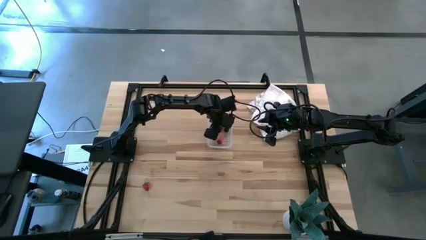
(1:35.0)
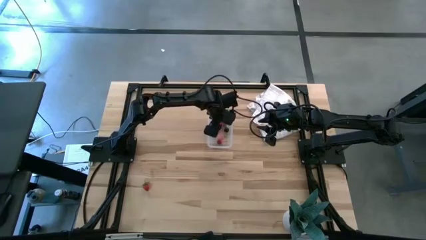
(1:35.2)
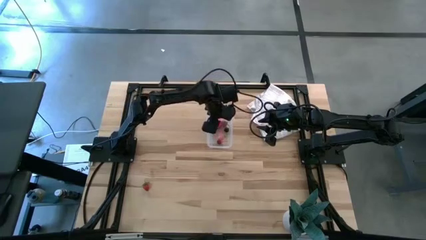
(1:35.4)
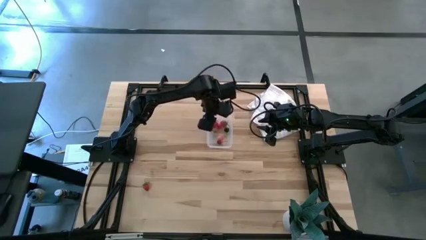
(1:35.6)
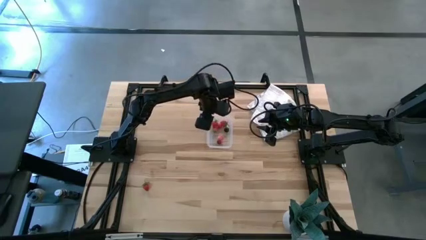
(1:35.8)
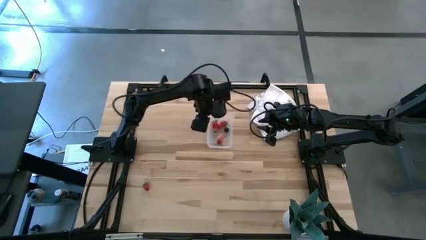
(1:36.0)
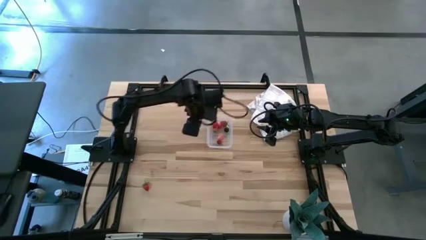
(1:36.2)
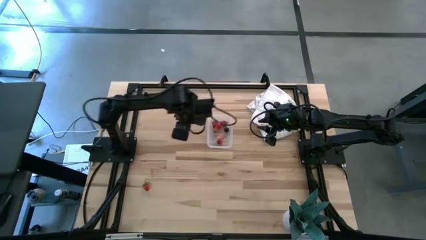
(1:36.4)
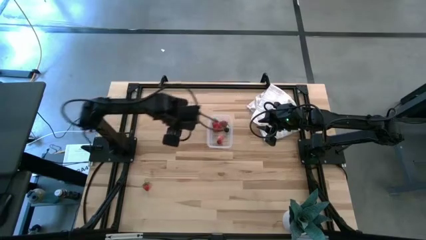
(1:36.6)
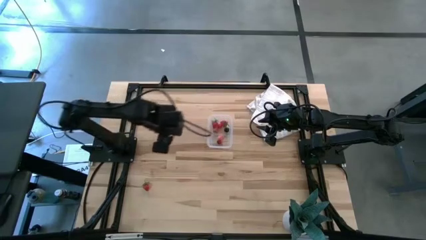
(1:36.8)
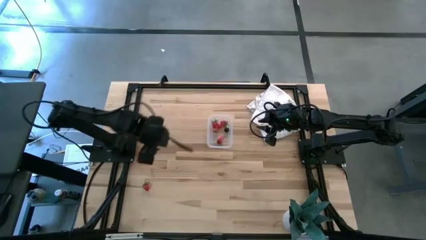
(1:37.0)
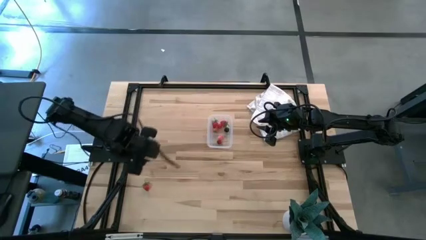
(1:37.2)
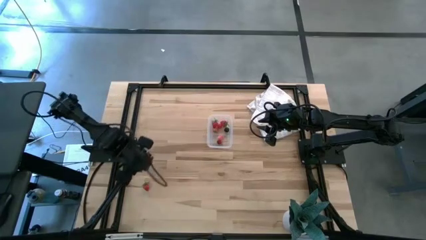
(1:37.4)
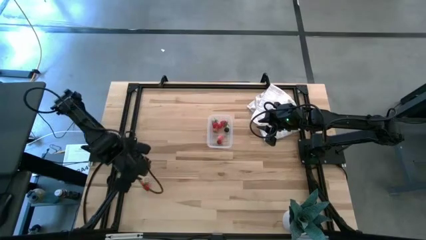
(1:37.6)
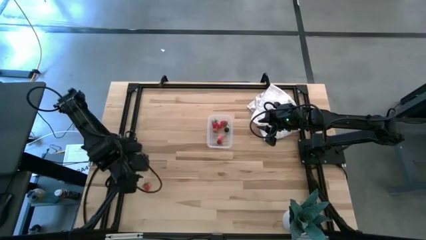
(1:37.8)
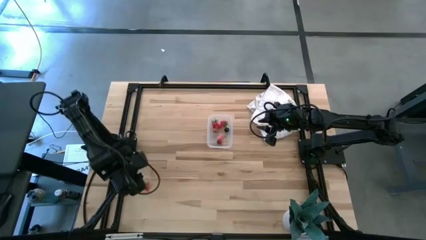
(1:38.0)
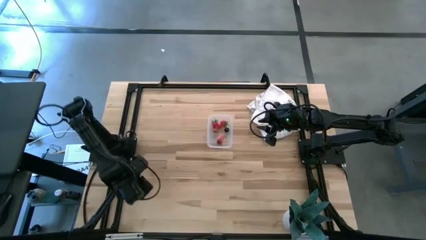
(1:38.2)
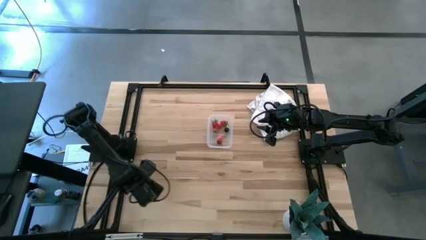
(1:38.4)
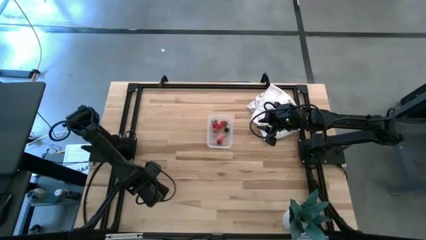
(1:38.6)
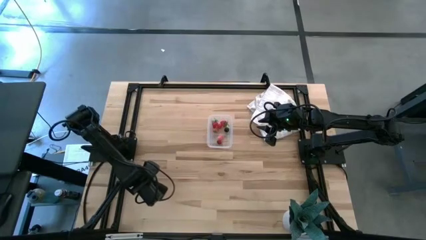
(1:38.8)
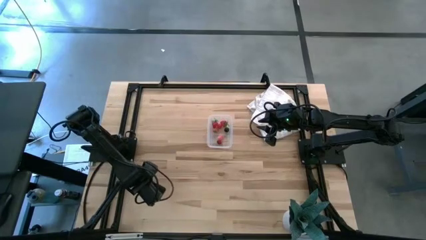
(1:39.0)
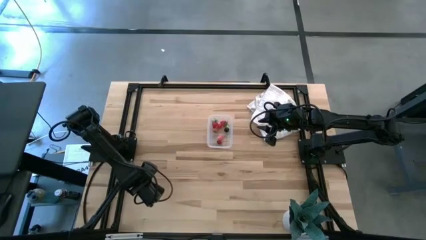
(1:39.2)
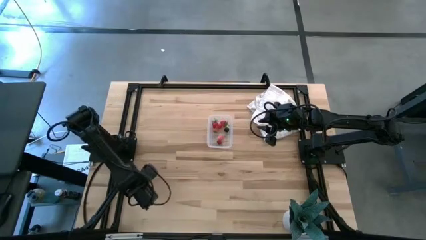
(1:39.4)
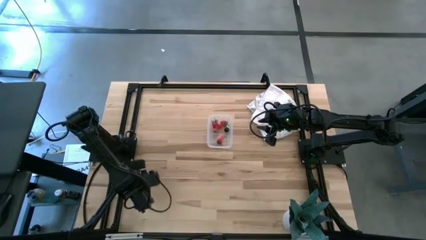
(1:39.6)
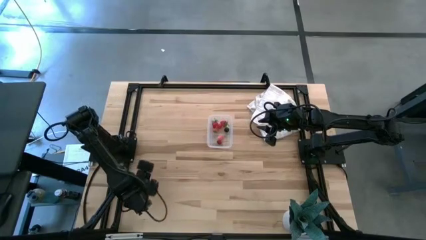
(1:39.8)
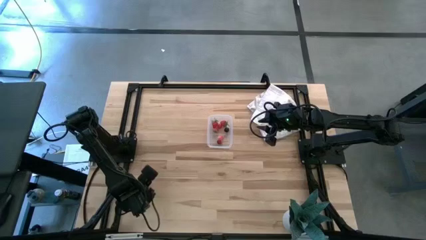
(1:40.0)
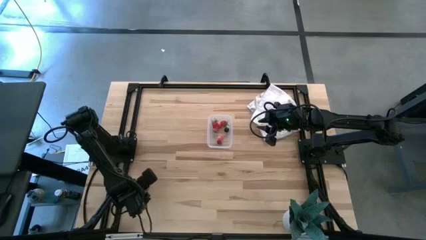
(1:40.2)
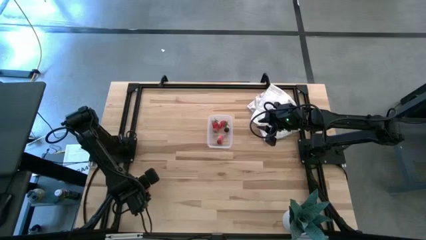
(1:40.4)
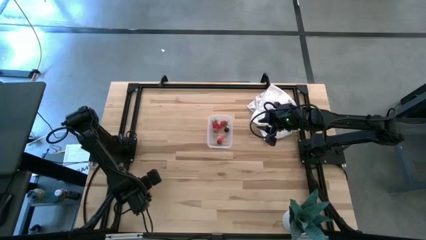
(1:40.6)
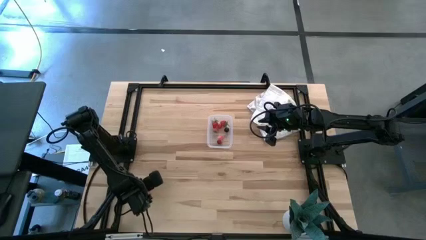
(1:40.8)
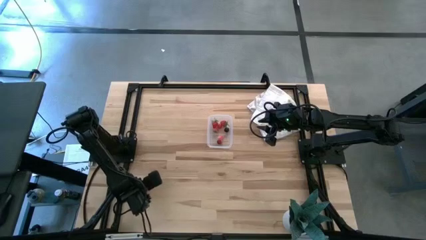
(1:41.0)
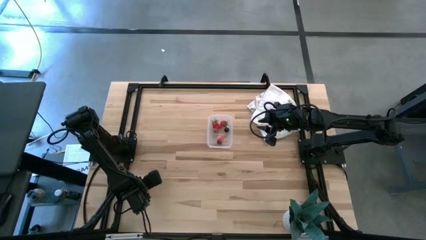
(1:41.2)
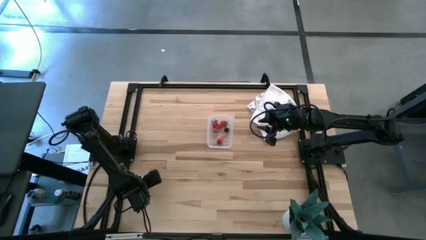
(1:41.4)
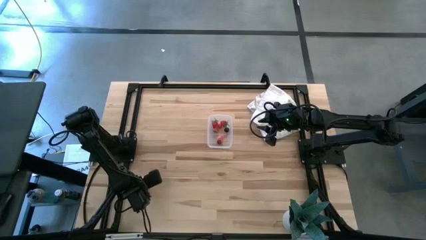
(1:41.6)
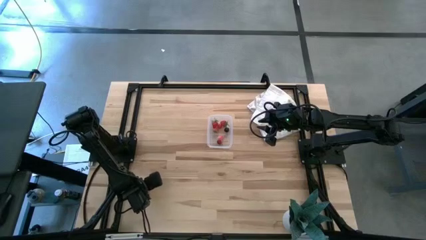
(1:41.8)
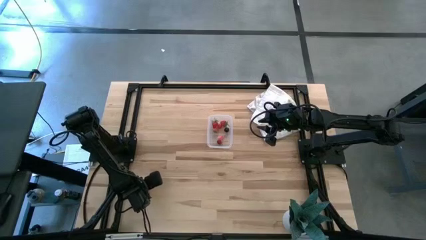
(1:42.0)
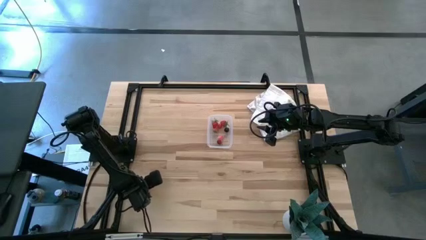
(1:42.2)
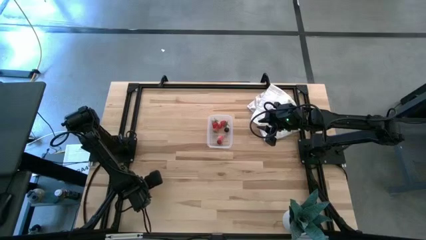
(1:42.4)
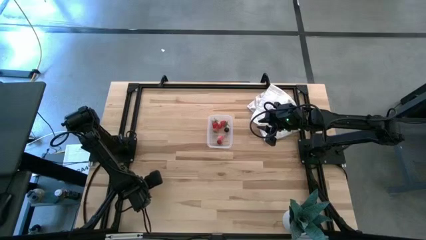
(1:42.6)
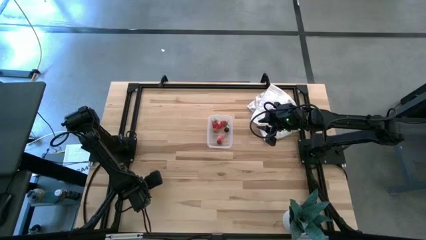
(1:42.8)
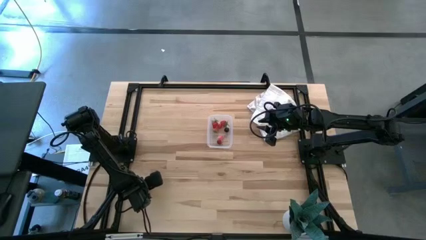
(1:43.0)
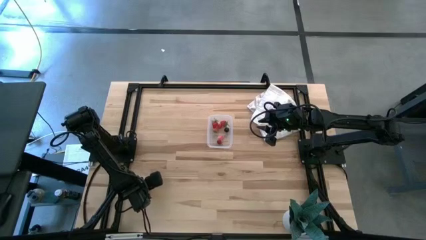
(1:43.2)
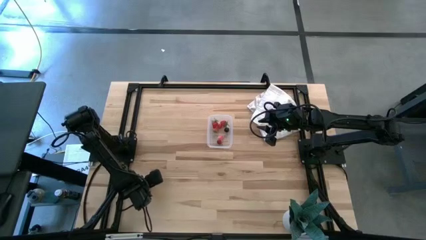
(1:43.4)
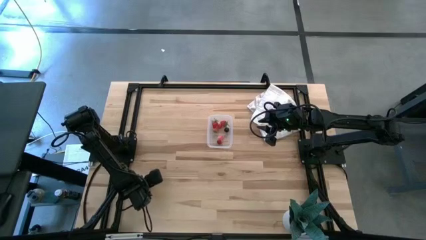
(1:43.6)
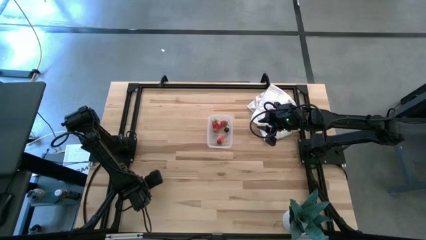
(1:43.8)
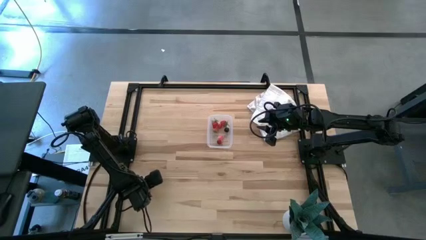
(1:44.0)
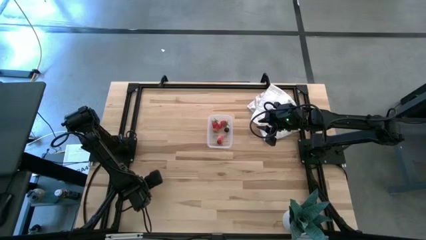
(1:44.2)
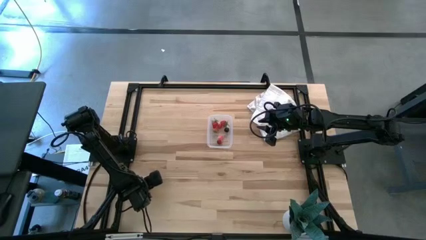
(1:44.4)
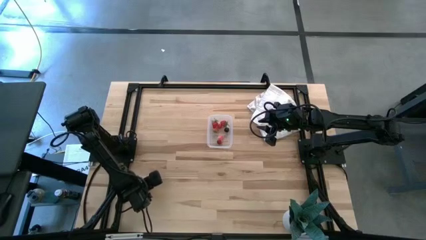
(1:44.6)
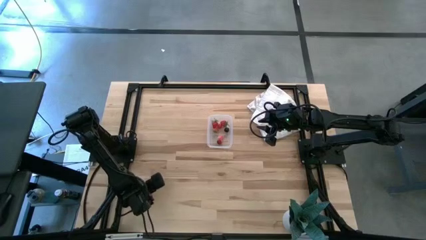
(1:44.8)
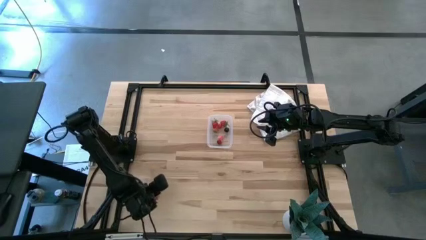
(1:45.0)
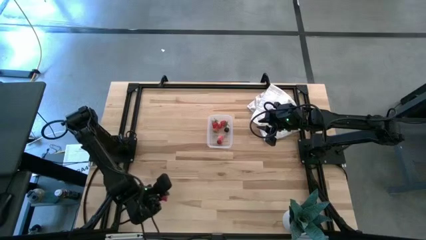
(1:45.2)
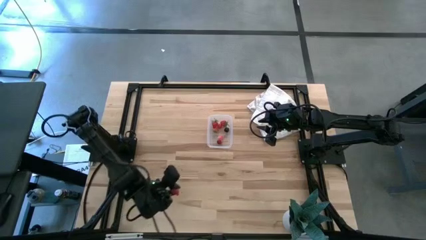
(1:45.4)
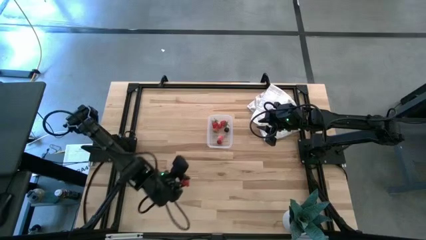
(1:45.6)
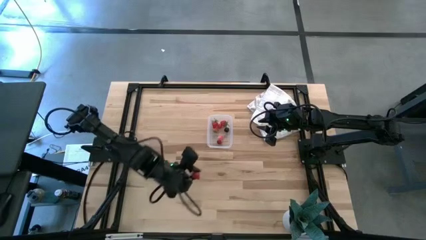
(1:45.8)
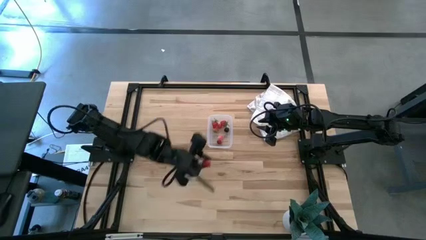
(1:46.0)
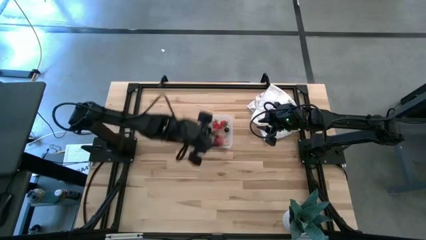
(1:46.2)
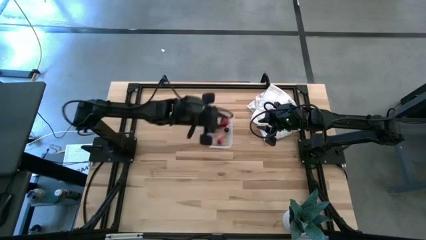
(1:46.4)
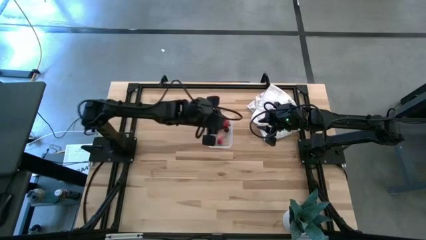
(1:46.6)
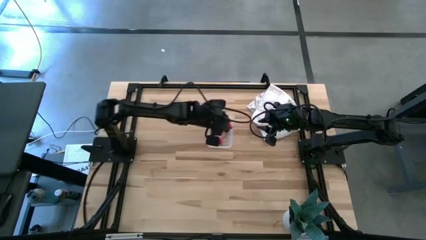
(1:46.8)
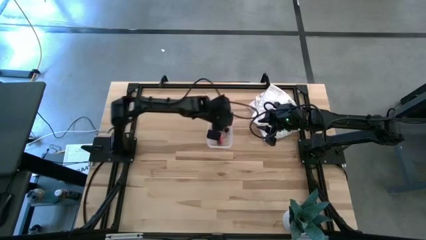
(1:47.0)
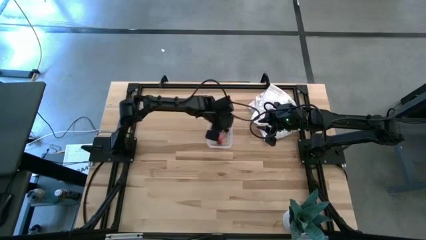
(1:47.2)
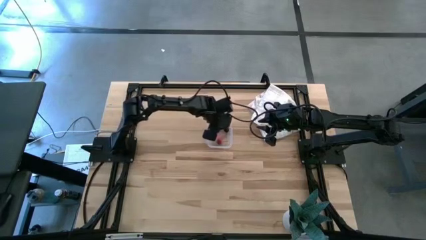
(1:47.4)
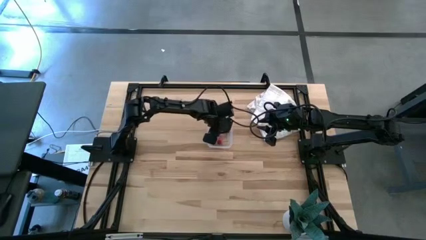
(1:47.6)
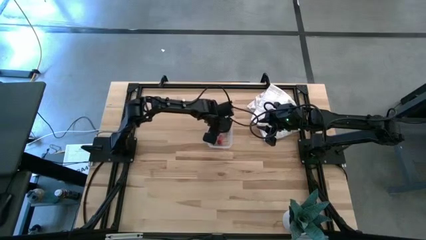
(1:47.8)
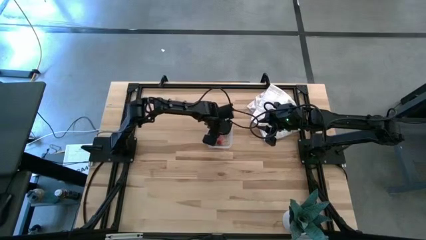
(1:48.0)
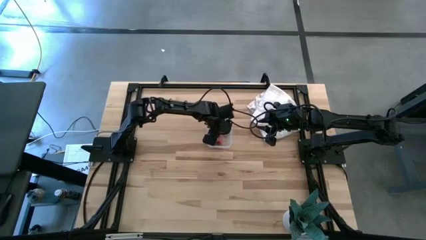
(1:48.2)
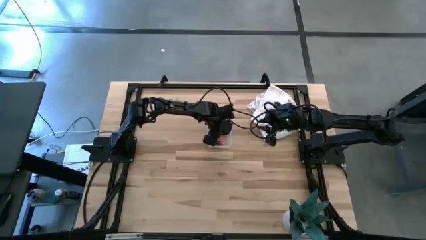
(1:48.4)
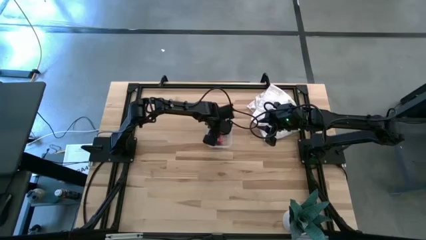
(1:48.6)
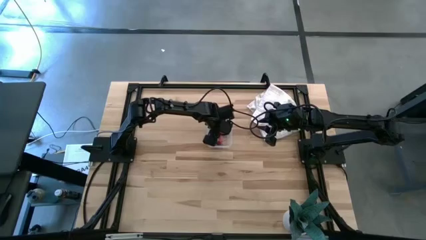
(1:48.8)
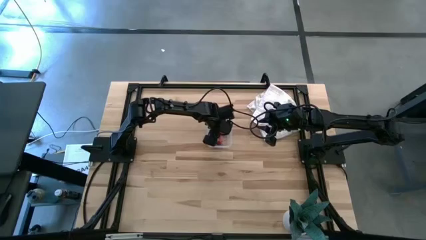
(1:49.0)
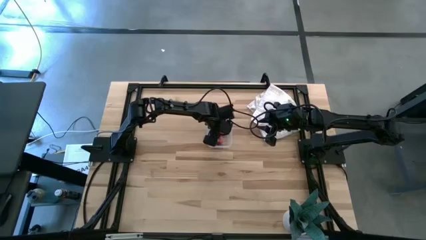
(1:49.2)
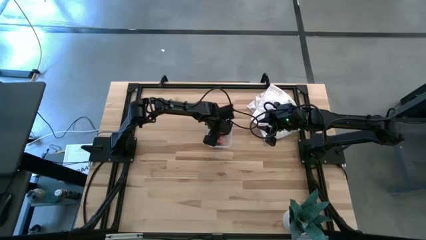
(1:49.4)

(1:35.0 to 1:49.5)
Task: Pick and placing Produce into tupperware
Put the strawberry into the transparent container
